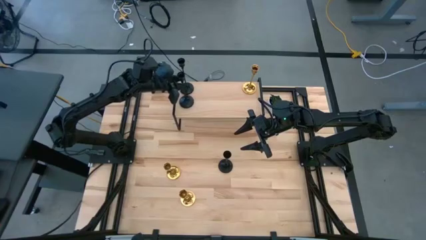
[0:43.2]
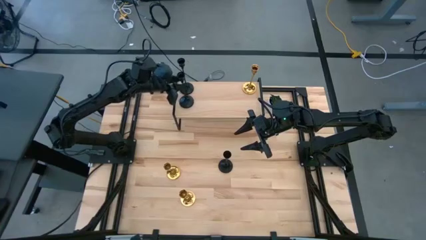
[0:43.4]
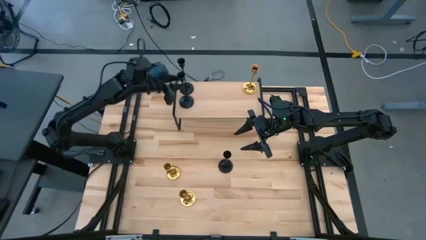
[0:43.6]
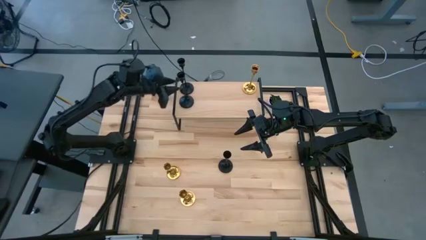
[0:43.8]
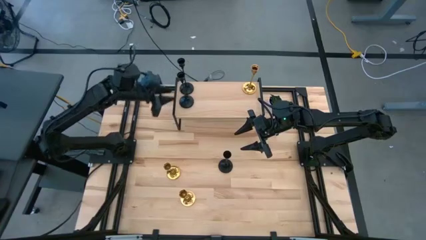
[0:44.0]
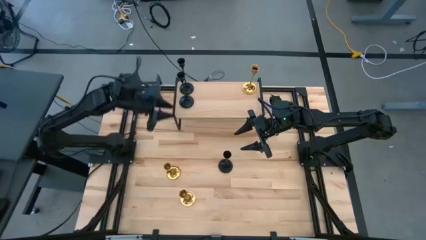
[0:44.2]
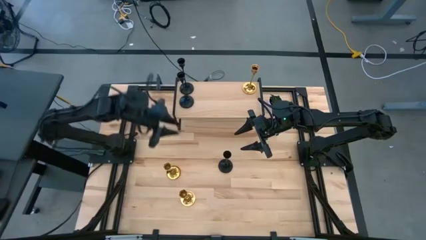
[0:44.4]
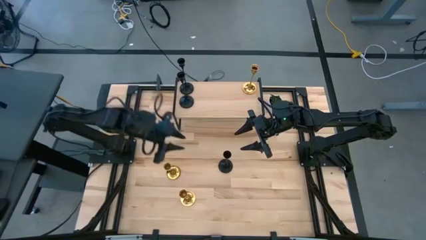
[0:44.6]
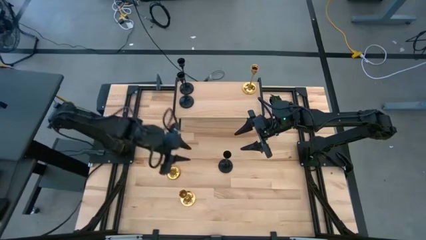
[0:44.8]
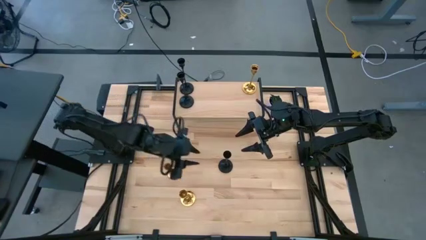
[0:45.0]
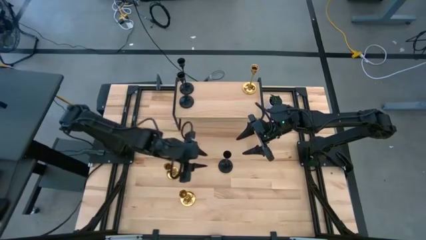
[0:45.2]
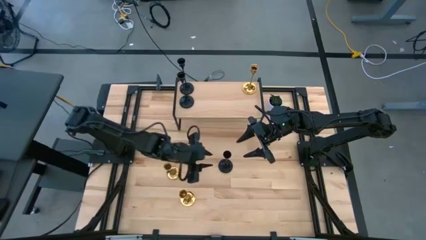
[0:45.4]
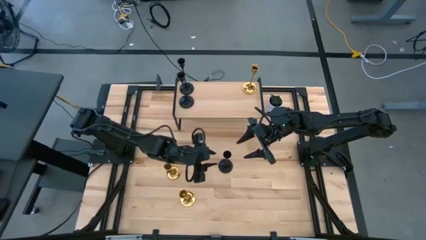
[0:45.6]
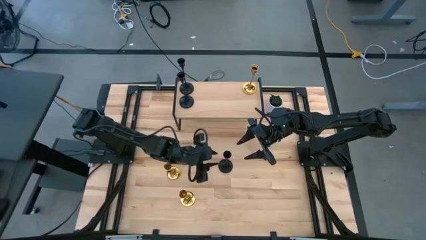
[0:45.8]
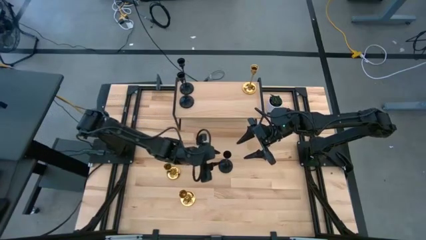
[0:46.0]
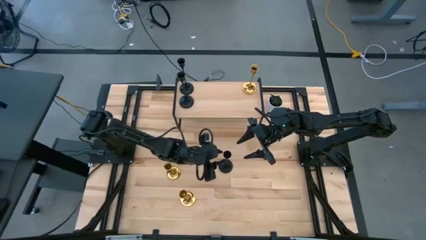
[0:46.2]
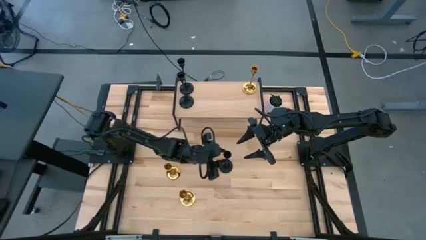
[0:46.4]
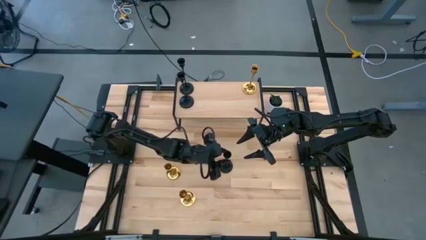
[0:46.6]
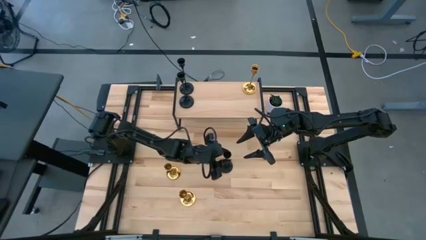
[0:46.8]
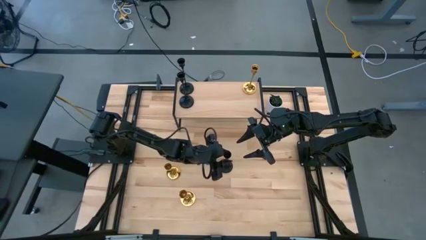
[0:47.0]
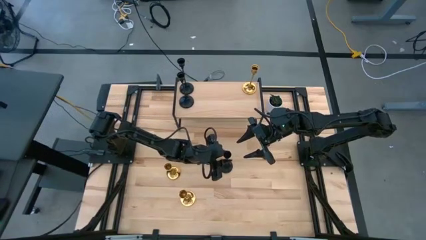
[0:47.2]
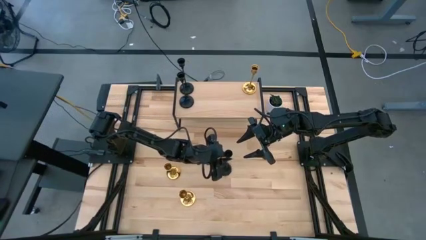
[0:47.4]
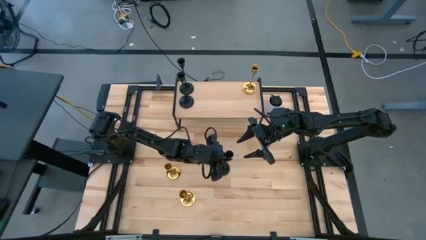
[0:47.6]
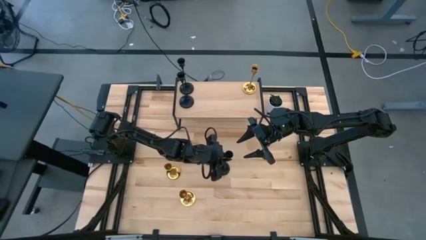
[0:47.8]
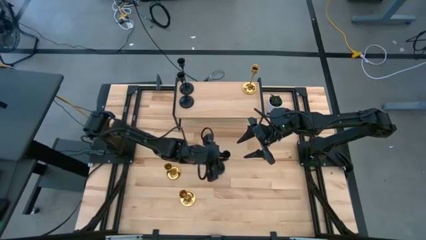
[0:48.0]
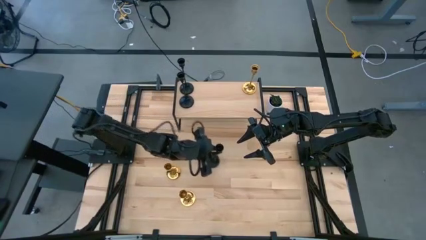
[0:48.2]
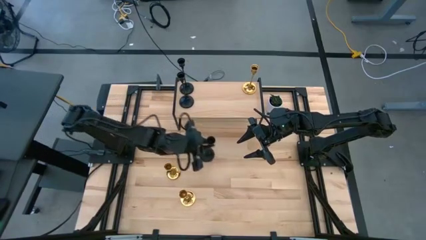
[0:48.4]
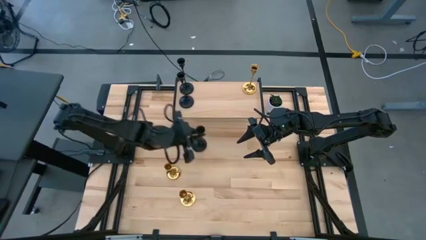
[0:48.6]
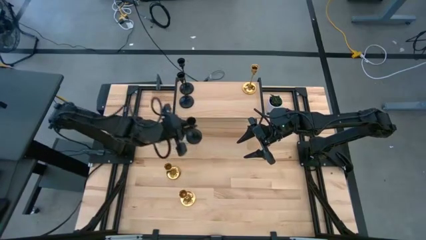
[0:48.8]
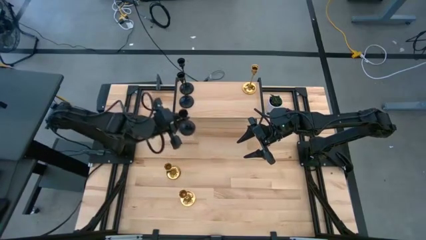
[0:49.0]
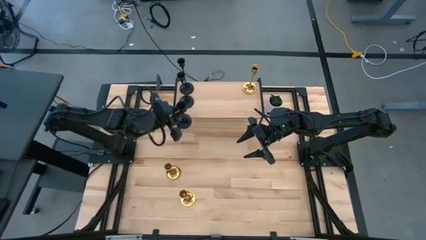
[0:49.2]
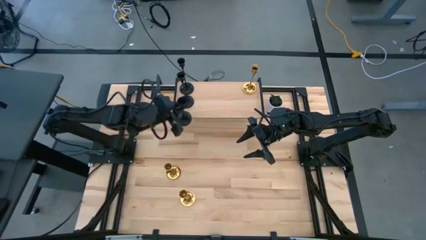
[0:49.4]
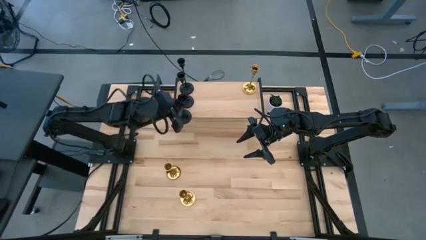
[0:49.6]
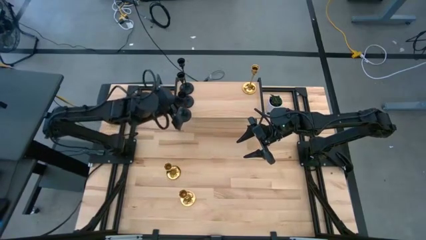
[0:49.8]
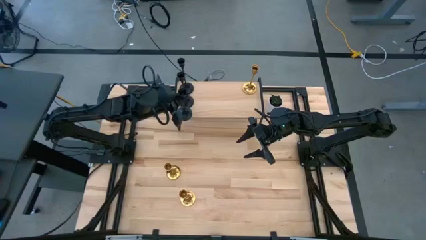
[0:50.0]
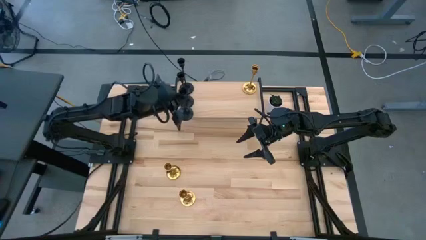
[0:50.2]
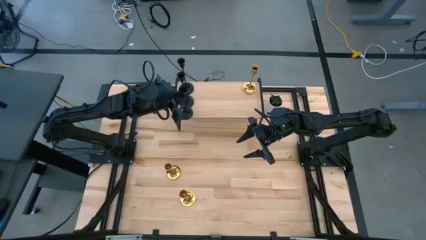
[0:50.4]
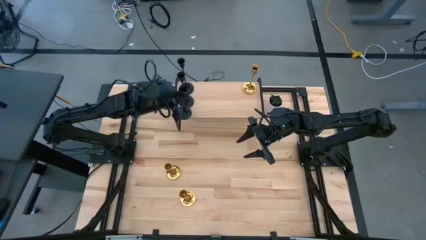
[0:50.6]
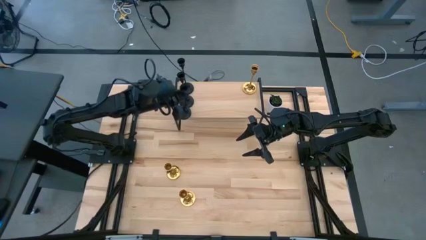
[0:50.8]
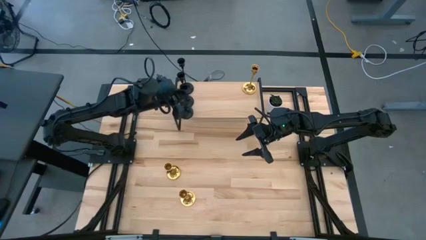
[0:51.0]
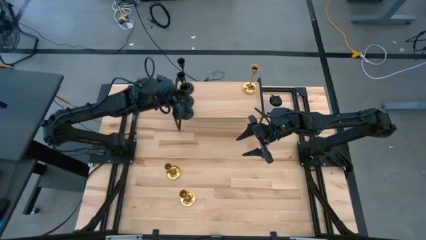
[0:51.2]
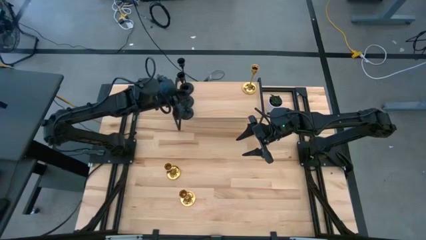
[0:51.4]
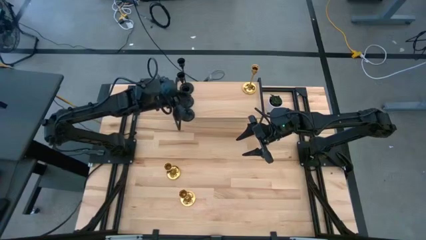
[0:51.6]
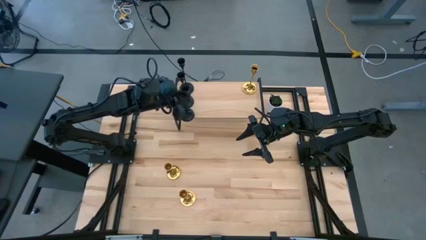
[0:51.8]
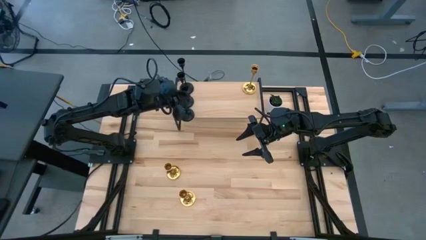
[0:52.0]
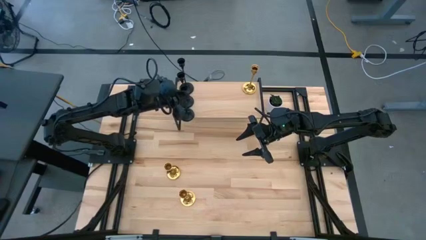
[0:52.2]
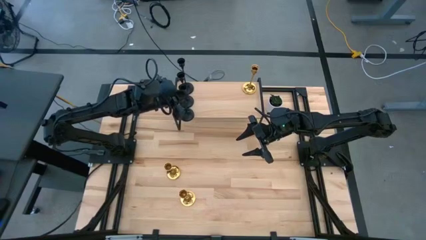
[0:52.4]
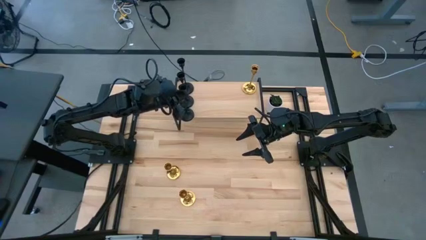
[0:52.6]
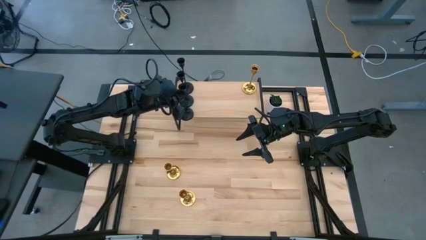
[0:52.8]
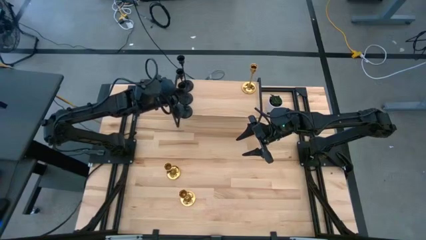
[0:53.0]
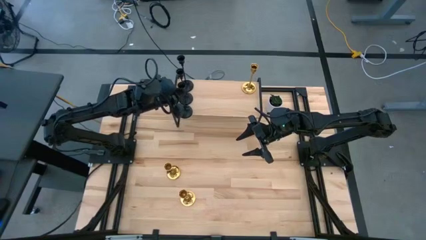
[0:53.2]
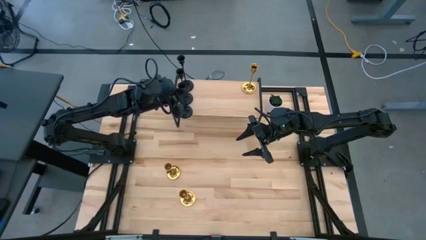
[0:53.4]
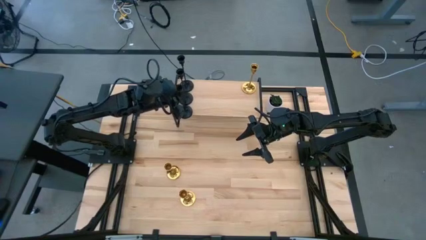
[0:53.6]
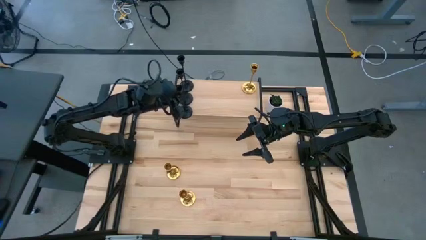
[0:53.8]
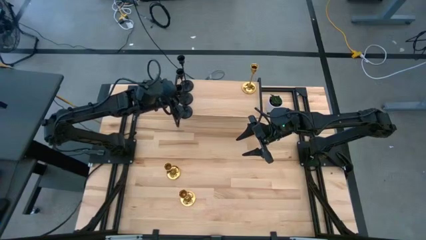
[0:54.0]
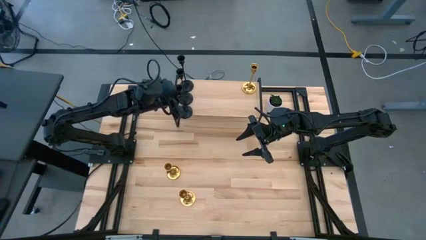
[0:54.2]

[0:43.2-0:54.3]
Task: Pick & Place candle stick holders
Put the black candle holder on the shelf aligned with the black candle holders

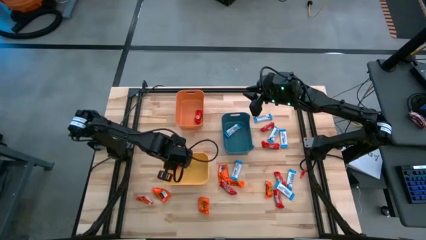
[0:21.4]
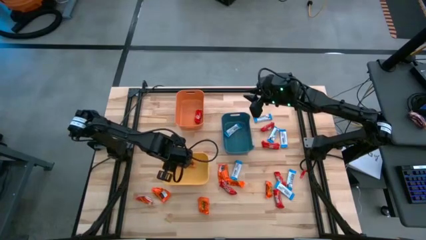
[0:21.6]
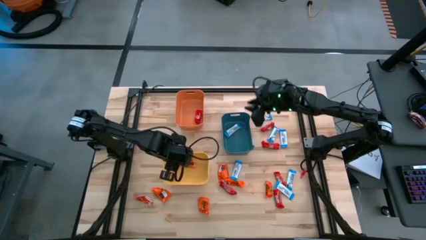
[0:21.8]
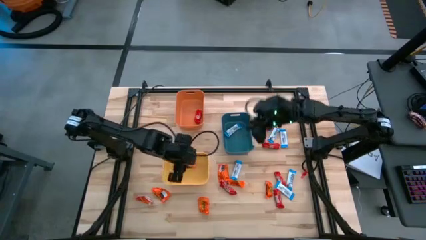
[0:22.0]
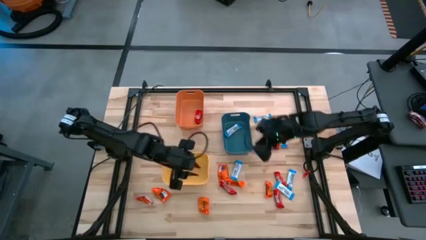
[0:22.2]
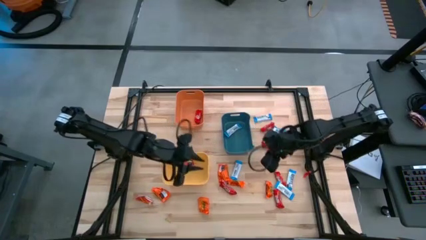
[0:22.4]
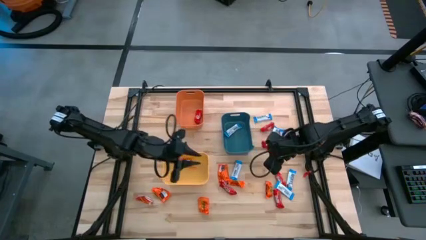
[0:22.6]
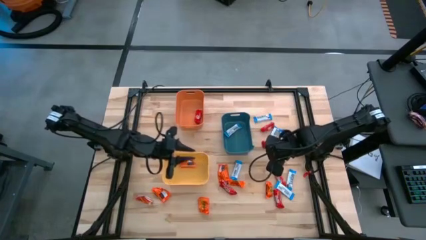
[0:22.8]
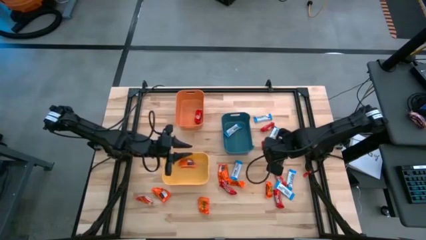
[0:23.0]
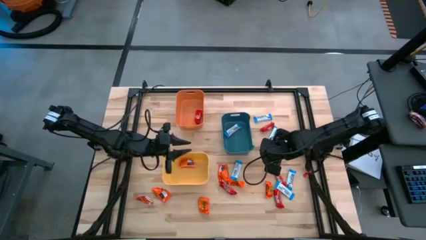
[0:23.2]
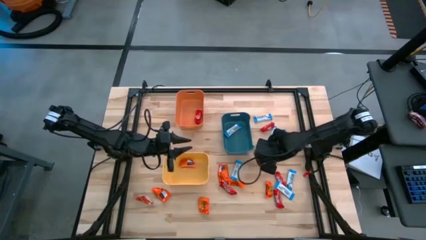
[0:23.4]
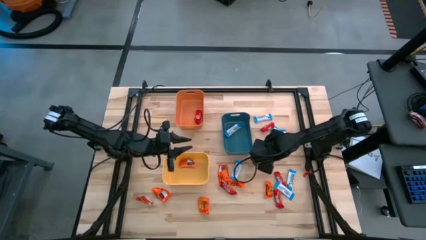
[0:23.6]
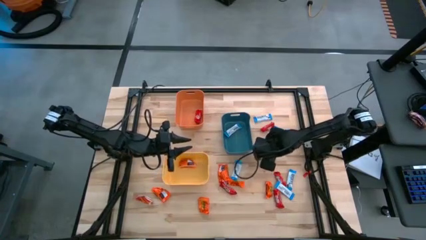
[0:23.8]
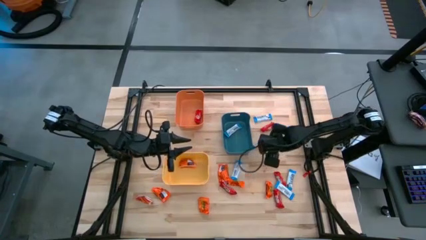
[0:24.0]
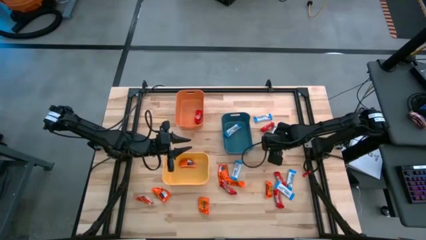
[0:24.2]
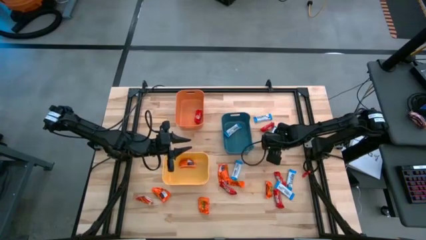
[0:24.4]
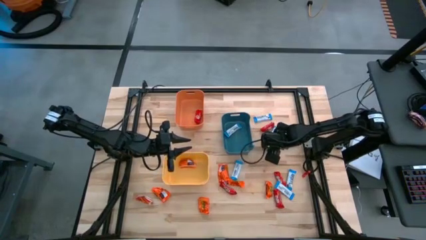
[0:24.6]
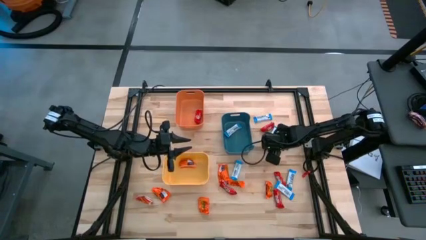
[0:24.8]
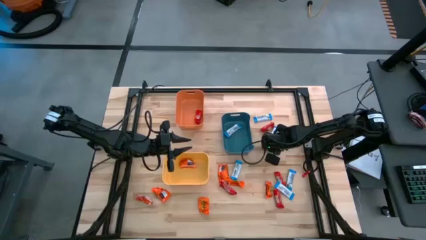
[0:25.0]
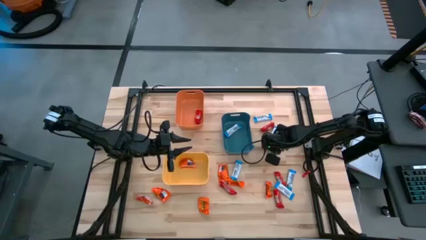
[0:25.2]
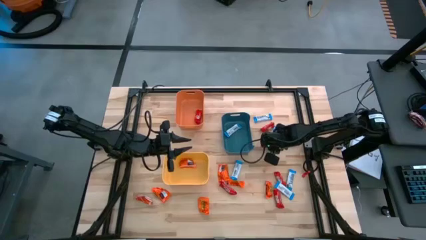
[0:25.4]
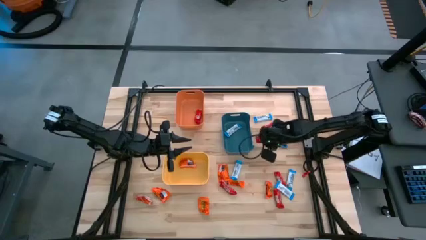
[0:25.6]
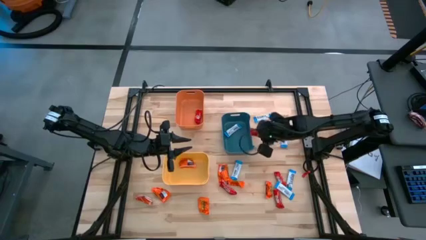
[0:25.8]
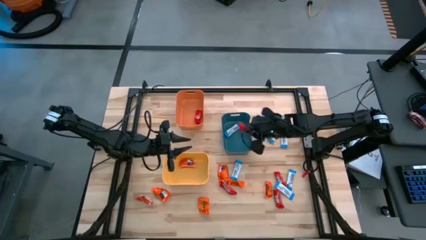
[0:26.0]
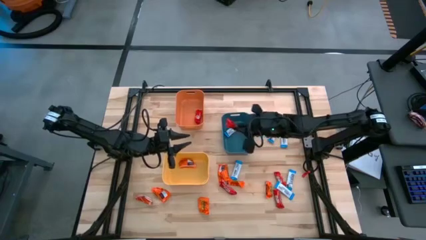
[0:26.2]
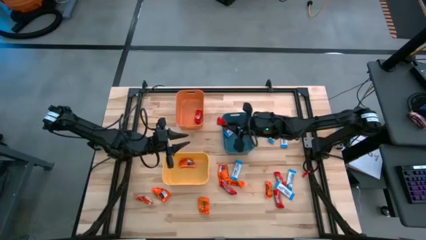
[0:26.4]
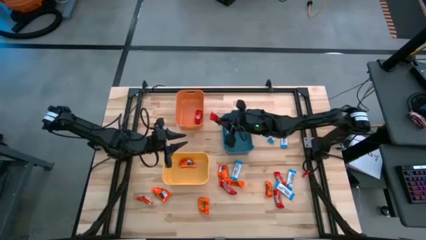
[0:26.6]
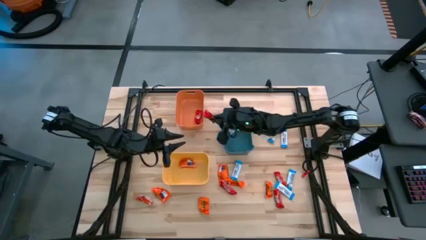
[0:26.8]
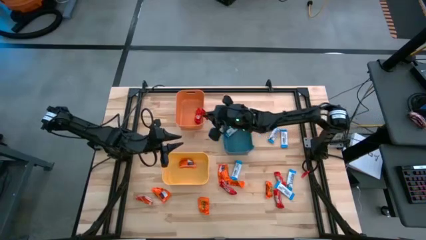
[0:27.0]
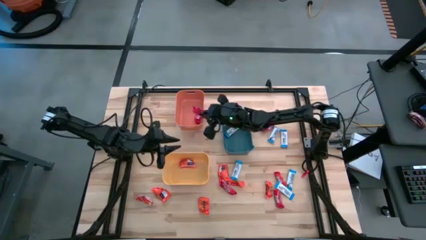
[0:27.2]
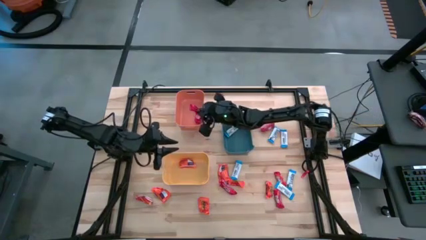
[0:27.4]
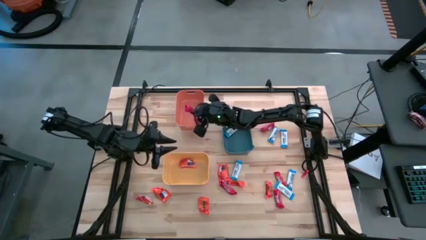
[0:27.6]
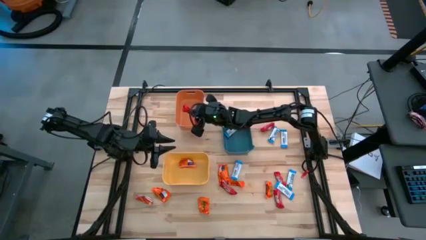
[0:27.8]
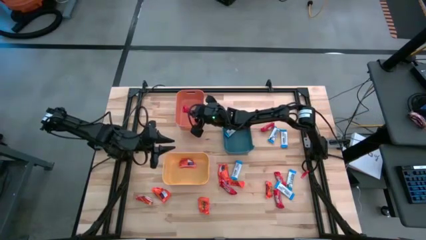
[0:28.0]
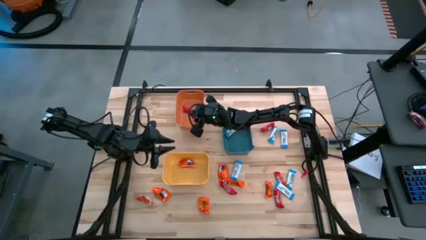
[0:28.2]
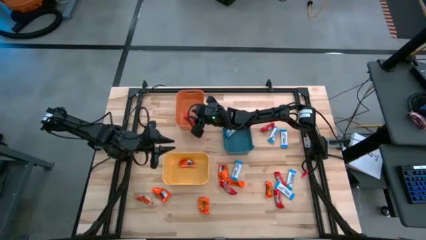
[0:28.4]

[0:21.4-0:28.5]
Task: Organize candy in baskets
Put the red chocolate into the orange bin
